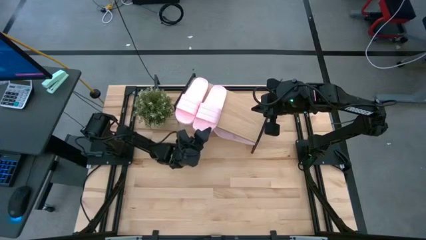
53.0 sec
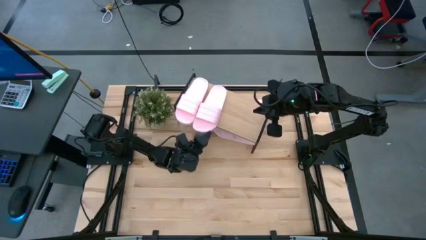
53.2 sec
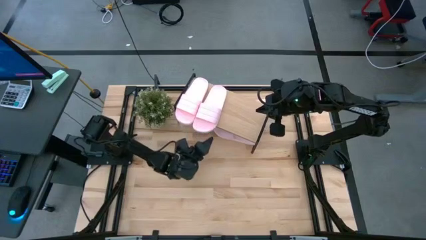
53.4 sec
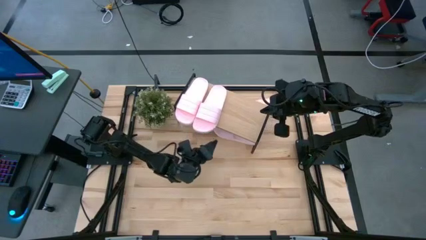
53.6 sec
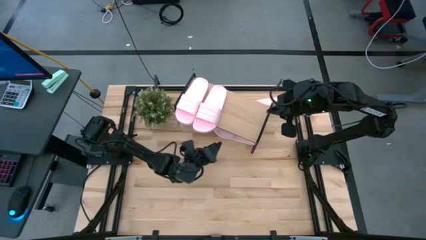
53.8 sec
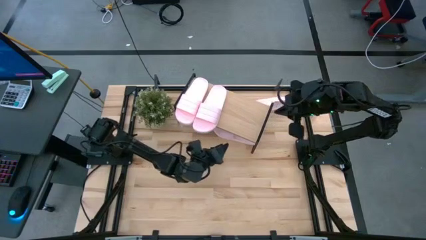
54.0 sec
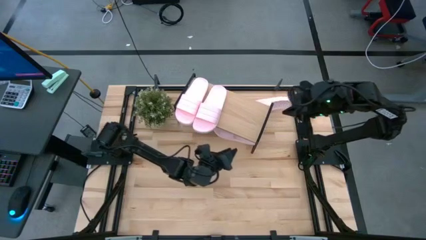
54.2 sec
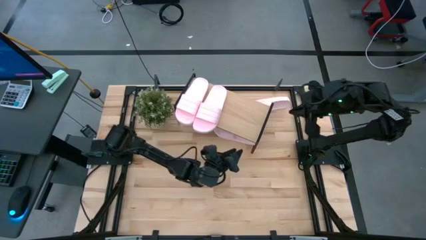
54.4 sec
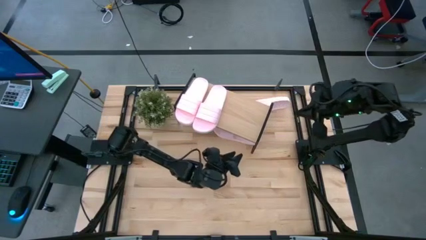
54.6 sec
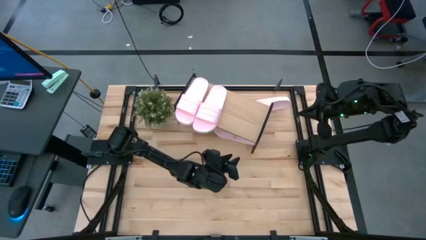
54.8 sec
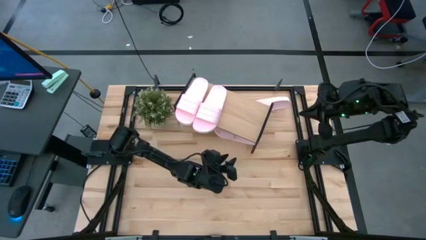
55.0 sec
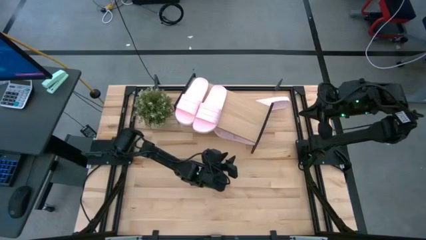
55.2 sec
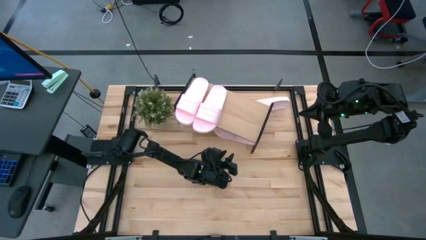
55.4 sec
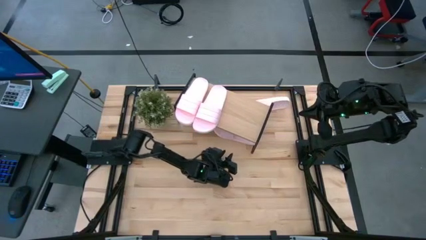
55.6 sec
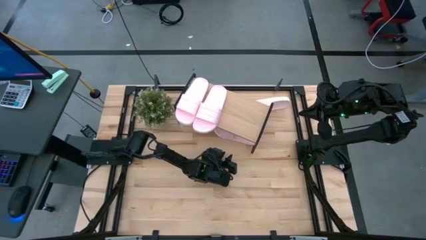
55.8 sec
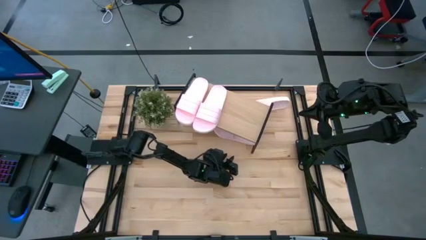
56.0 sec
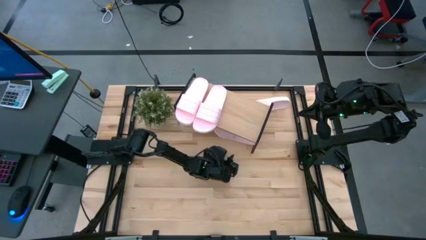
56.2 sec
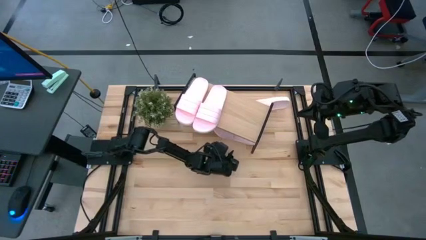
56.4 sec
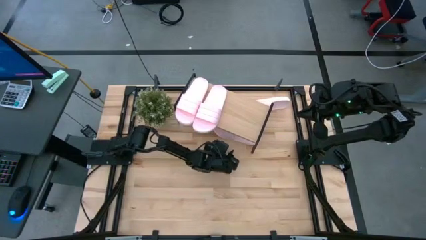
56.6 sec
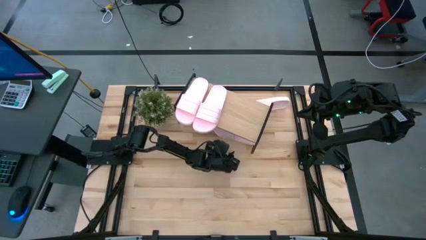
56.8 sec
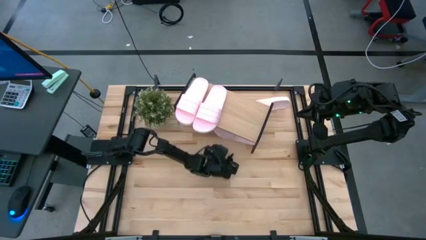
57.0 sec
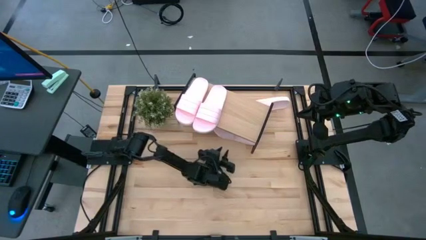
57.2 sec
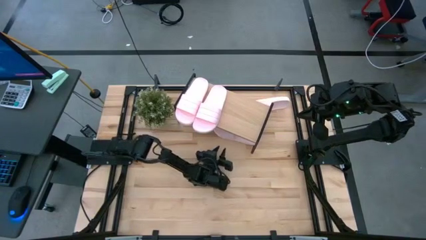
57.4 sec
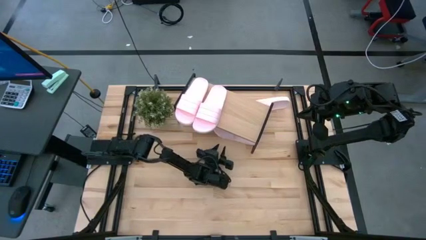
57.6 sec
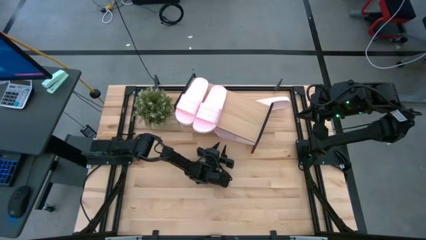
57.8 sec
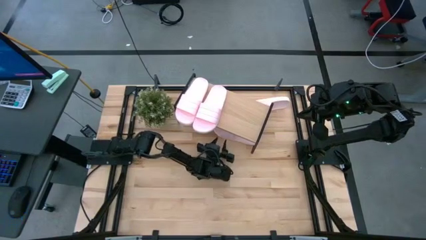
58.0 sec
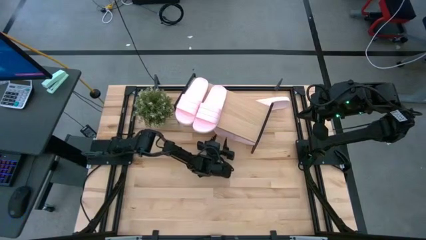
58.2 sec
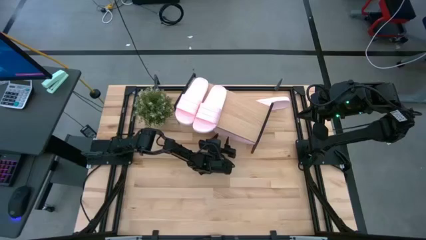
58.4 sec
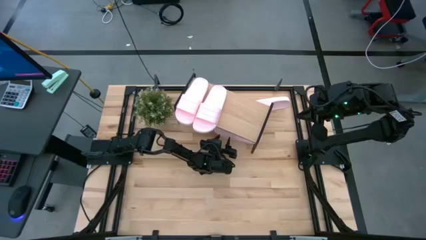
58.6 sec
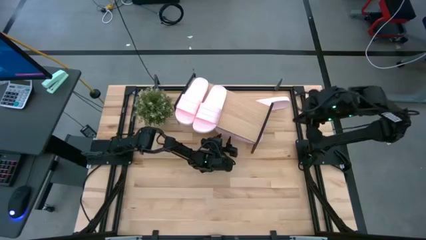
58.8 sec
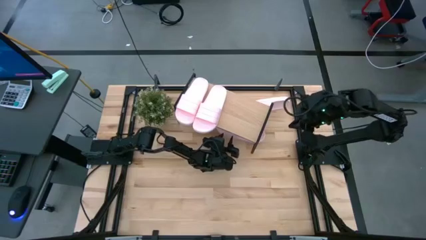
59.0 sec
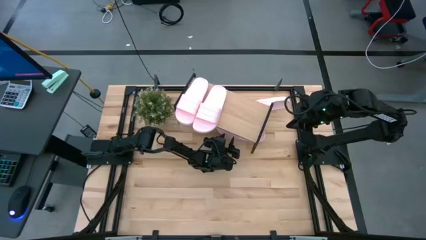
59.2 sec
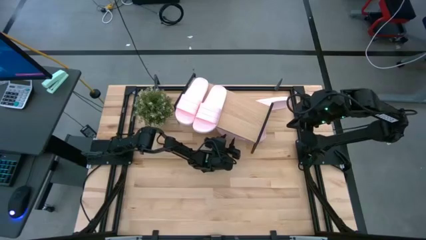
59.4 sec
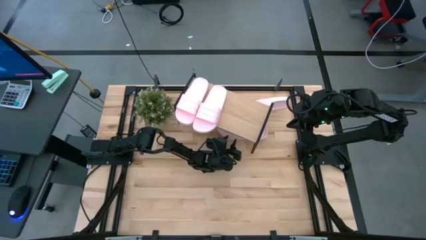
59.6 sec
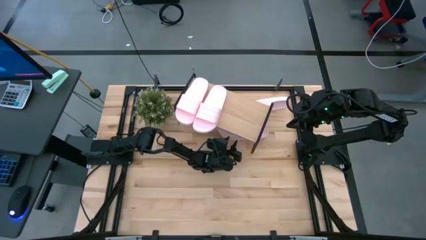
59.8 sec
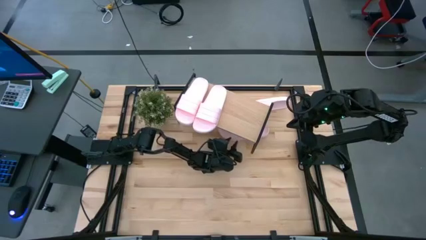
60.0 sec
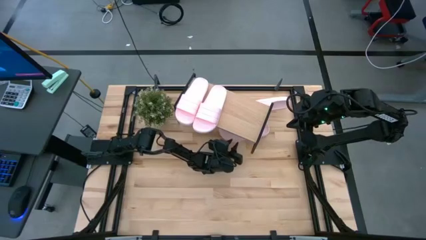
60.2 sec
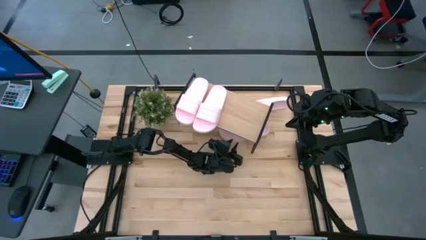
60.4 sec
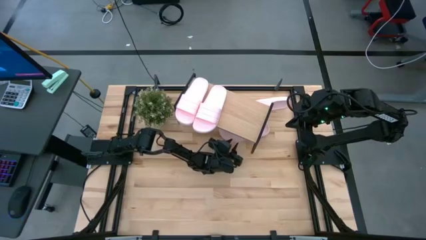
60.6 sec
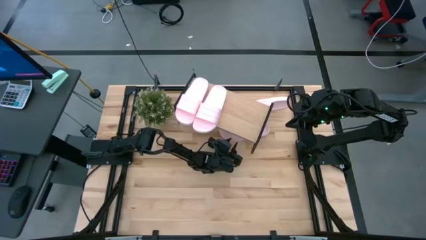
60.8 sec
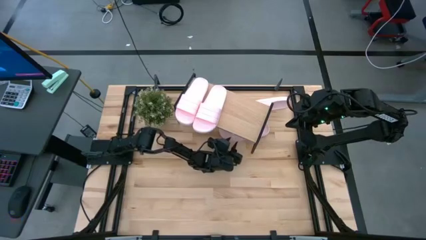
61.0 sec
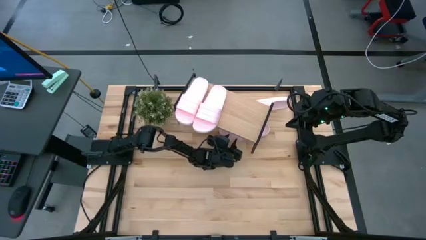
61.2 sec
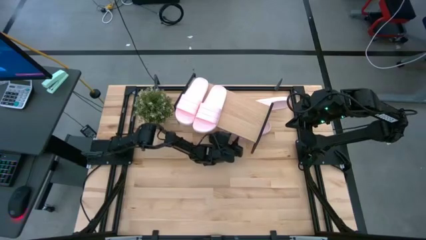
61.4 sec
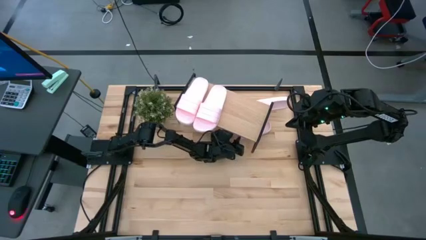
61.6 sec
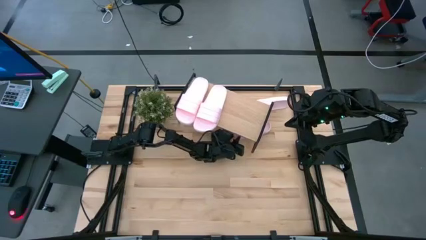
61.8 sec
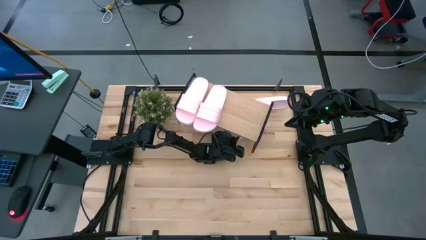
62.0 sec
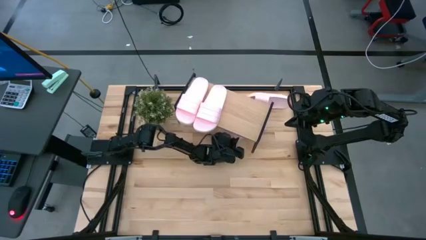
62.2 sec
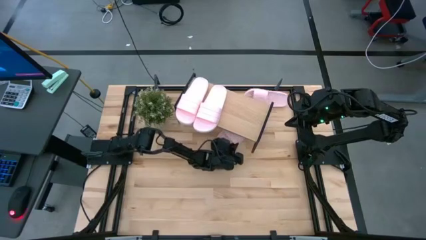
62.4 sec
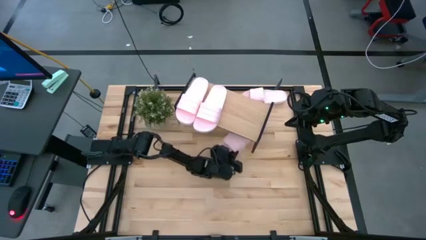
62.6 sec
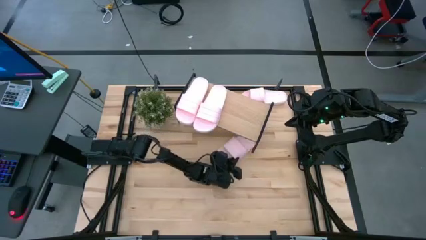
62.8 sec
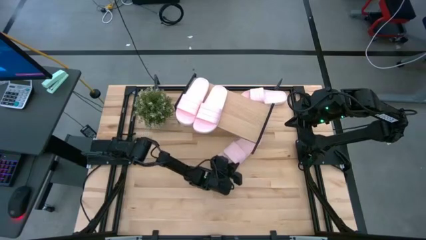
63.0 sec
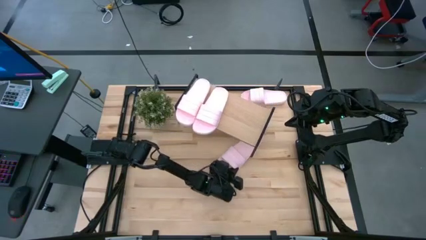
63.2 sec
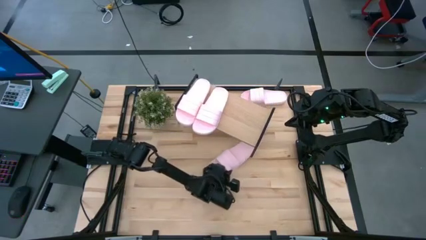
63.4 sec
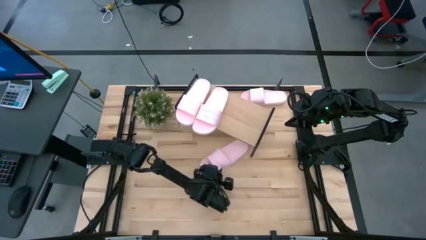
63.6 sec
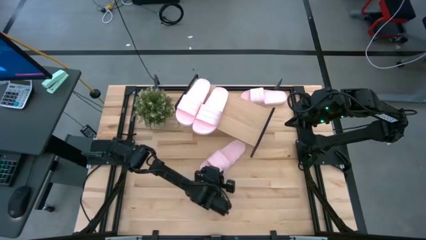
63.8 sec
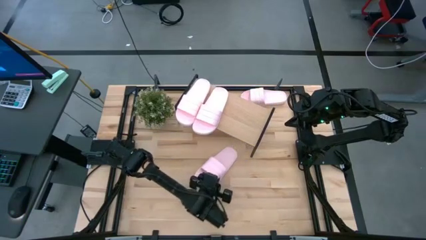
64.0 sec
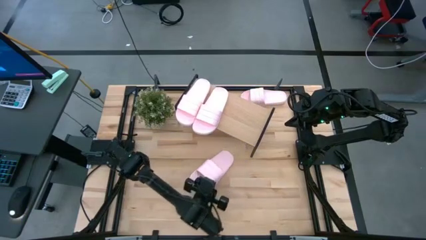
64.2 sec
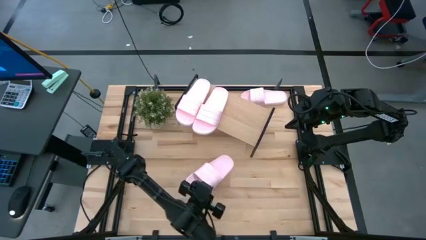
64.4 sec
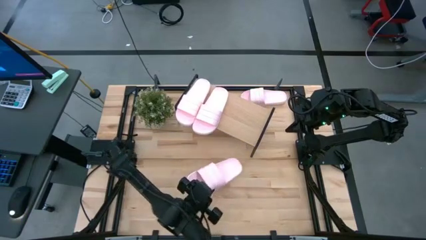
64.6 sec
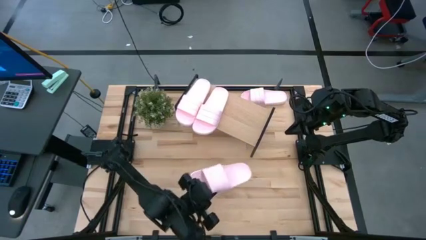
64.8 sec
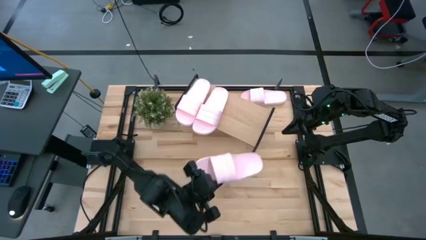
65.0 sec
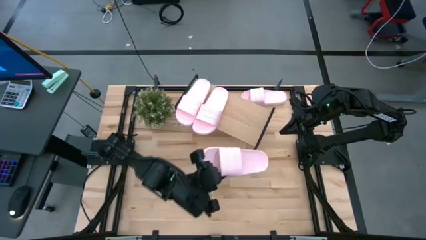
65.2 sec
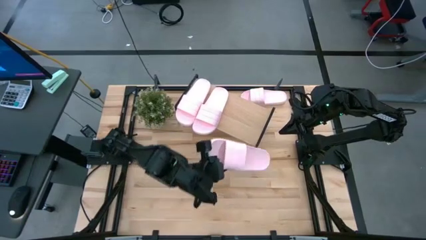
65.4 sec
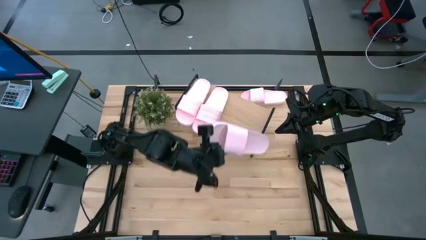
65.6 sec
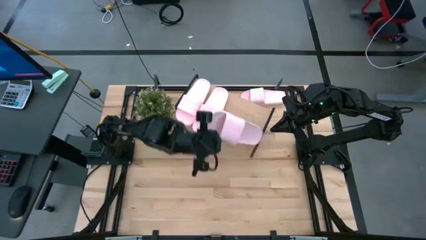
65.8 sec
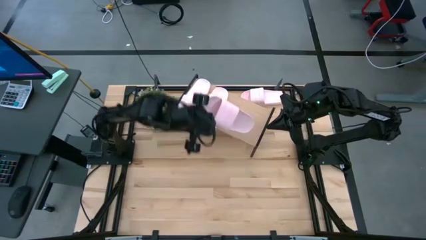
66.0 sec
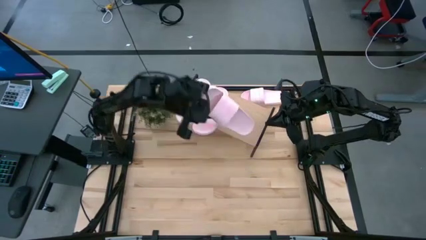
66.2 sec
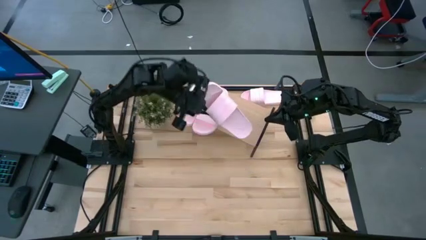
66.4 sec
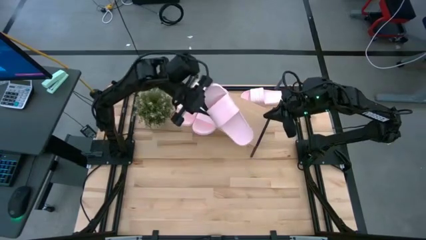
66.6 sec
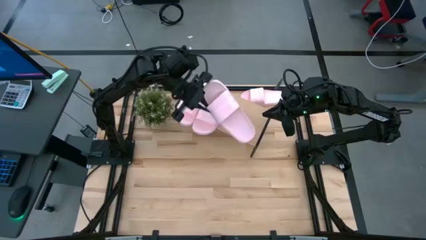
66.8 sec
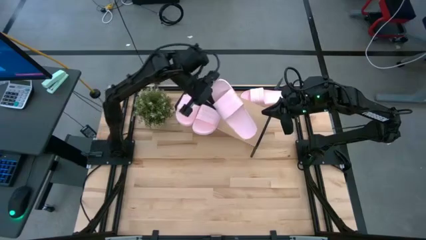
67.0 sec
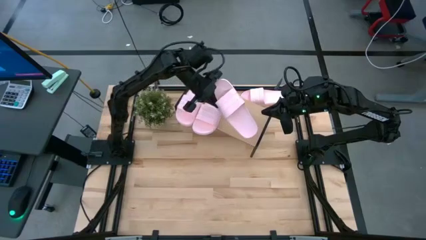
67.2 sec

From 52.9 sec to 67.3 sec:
Task: Pick and place slides into the shelf
Put the pink slide on the shelf
